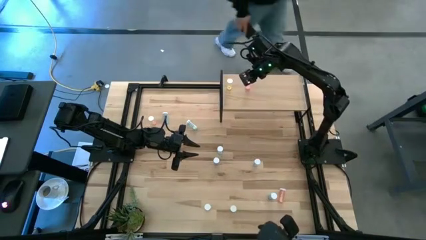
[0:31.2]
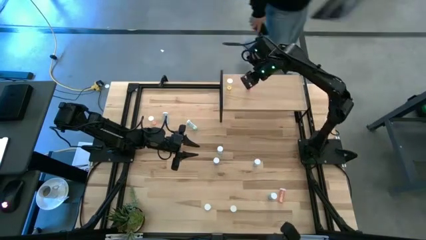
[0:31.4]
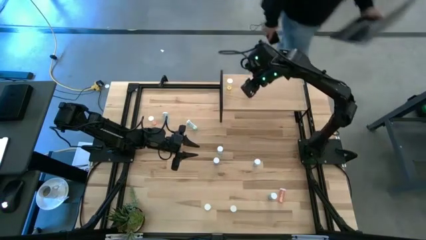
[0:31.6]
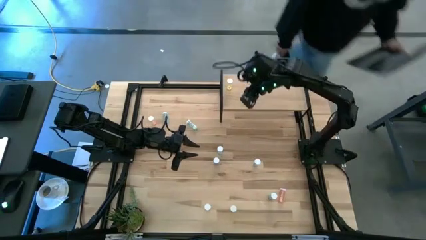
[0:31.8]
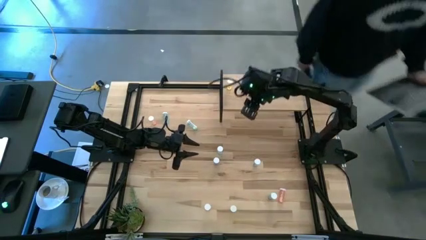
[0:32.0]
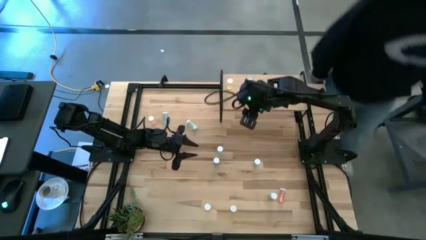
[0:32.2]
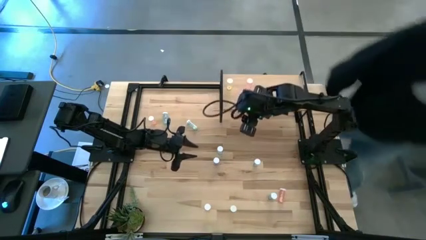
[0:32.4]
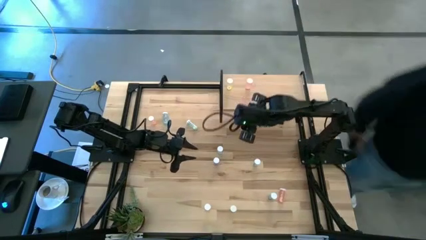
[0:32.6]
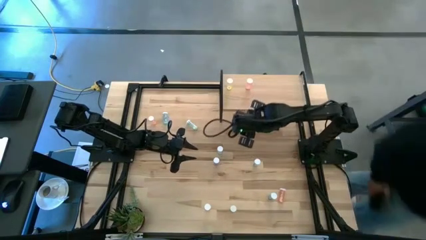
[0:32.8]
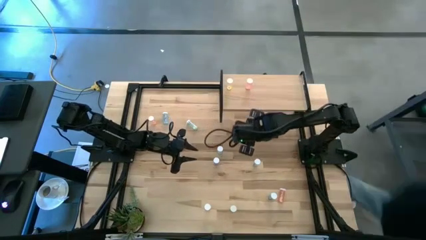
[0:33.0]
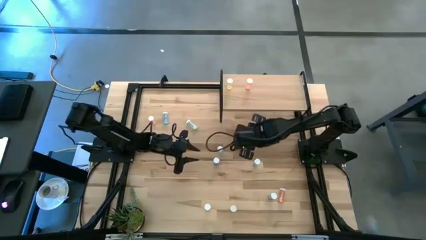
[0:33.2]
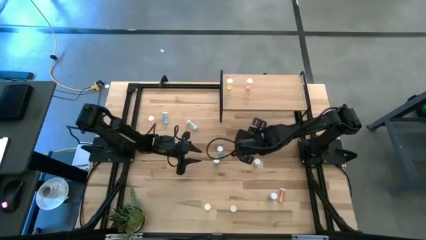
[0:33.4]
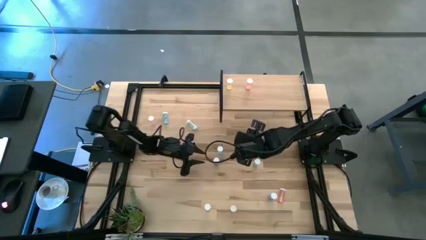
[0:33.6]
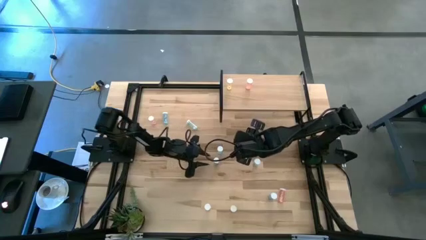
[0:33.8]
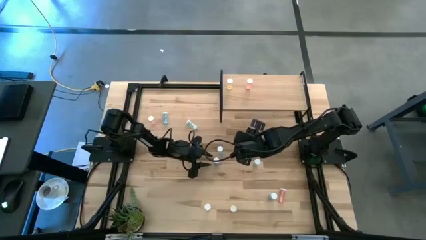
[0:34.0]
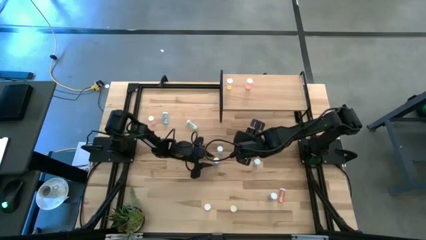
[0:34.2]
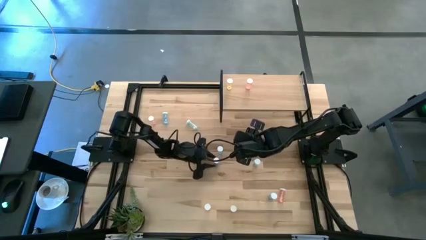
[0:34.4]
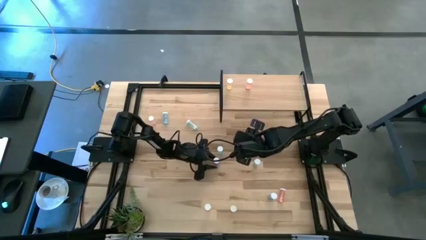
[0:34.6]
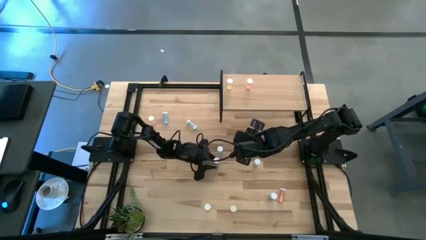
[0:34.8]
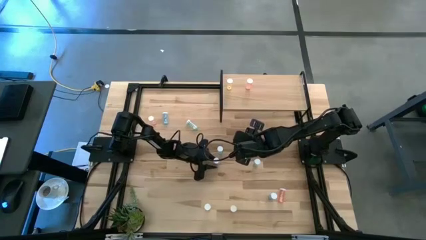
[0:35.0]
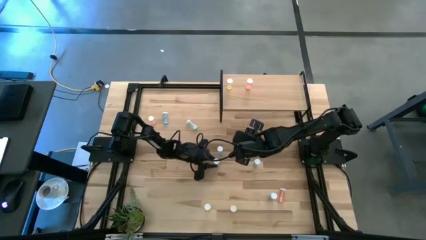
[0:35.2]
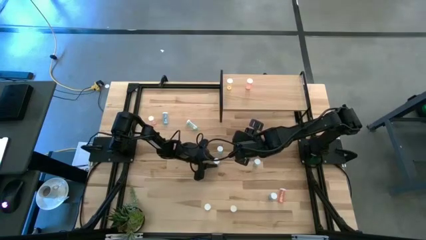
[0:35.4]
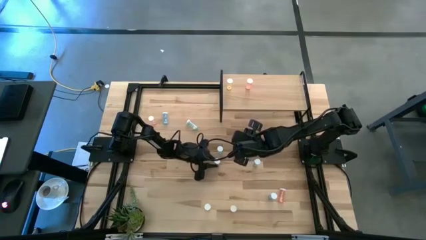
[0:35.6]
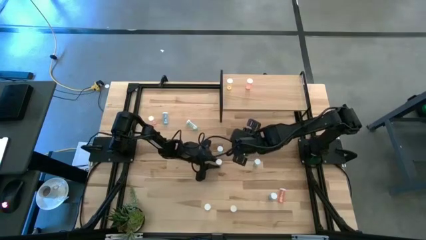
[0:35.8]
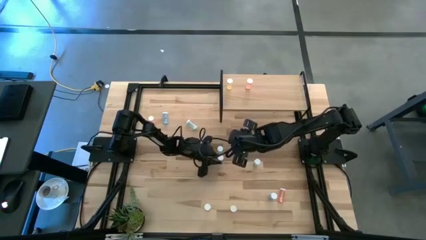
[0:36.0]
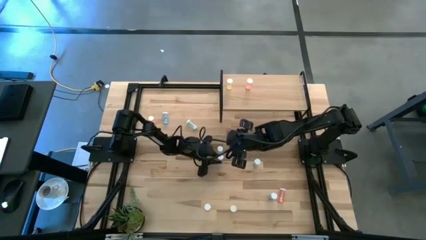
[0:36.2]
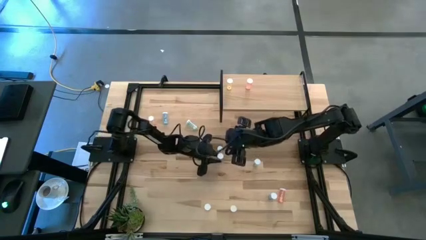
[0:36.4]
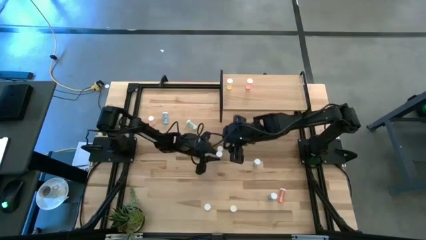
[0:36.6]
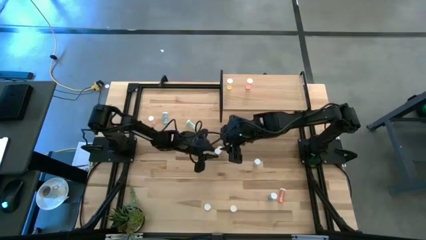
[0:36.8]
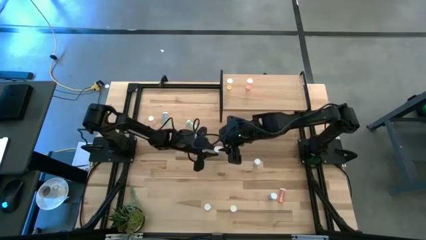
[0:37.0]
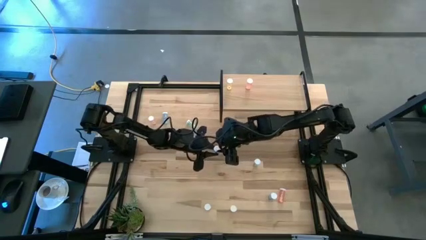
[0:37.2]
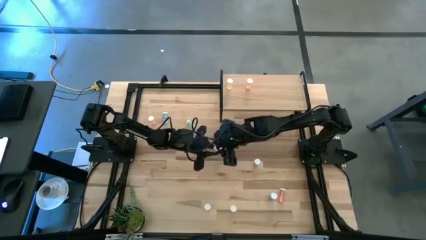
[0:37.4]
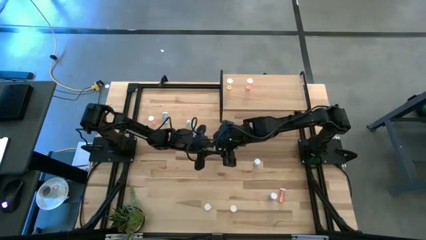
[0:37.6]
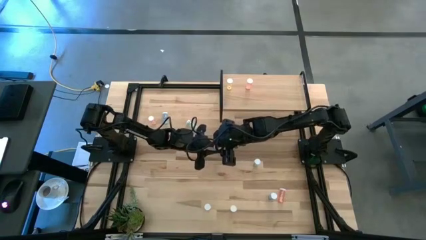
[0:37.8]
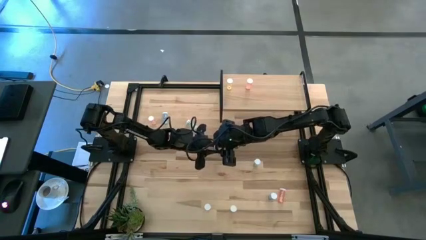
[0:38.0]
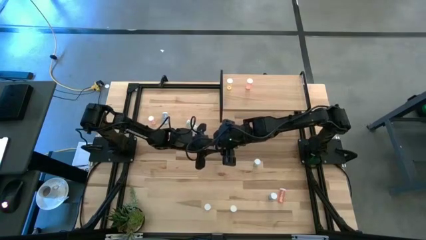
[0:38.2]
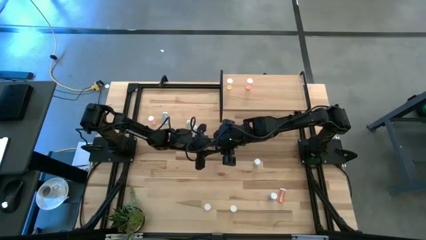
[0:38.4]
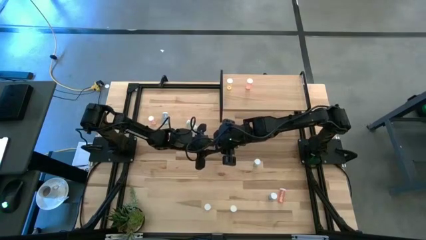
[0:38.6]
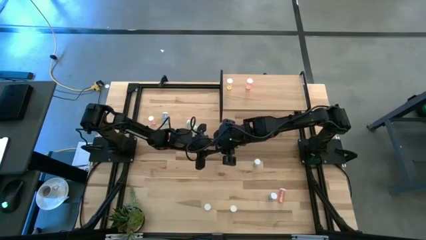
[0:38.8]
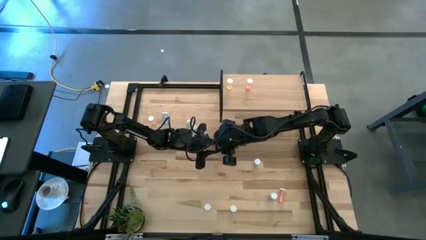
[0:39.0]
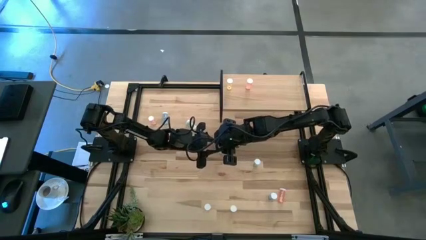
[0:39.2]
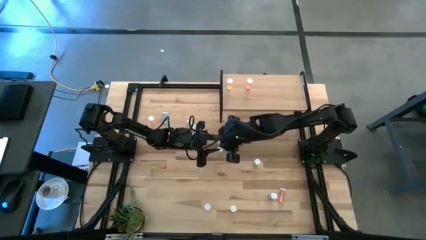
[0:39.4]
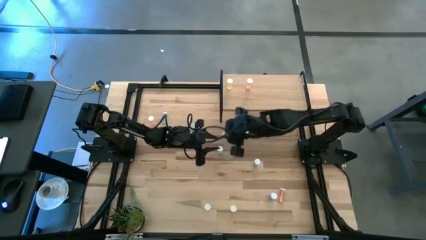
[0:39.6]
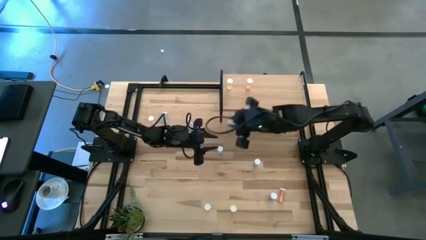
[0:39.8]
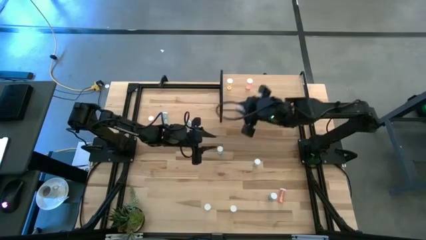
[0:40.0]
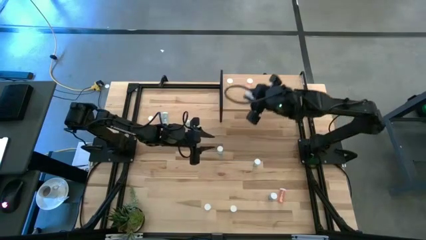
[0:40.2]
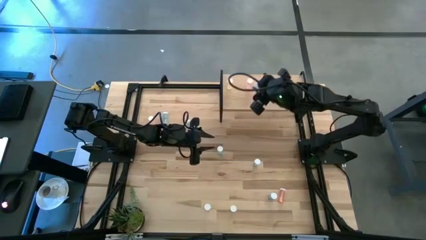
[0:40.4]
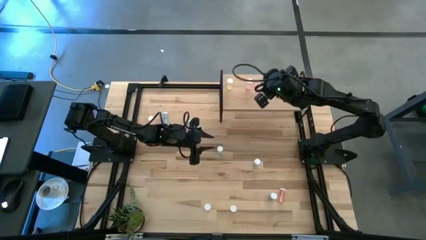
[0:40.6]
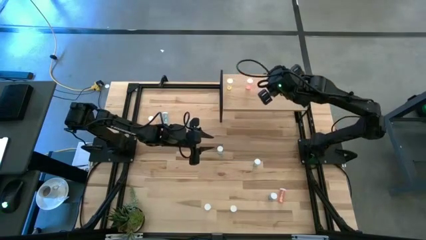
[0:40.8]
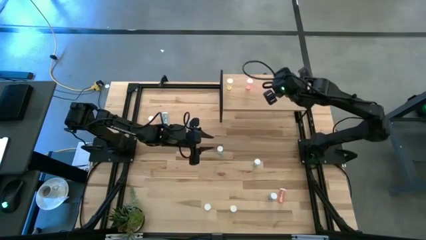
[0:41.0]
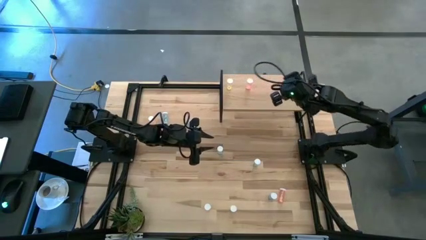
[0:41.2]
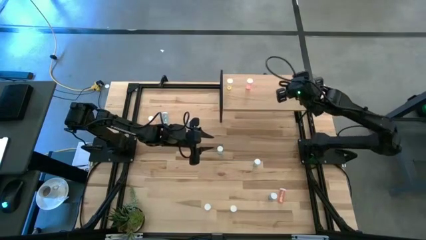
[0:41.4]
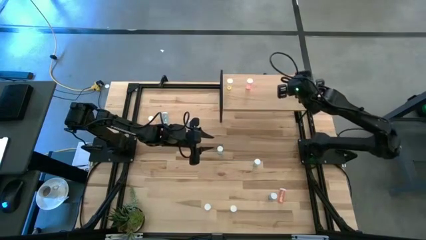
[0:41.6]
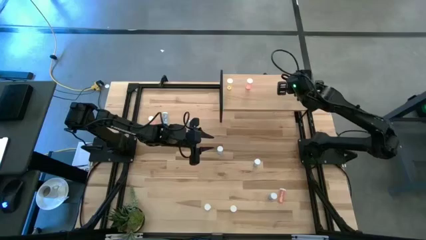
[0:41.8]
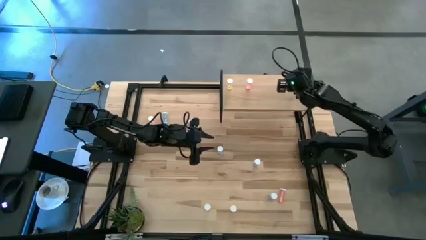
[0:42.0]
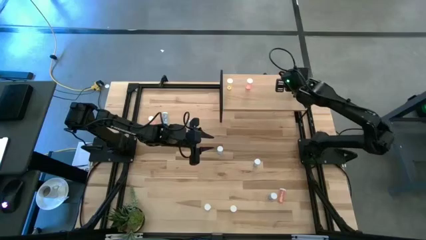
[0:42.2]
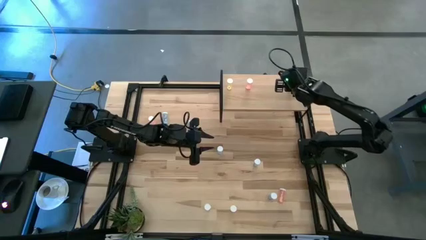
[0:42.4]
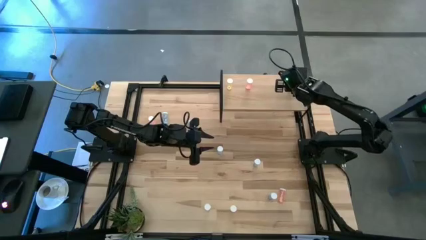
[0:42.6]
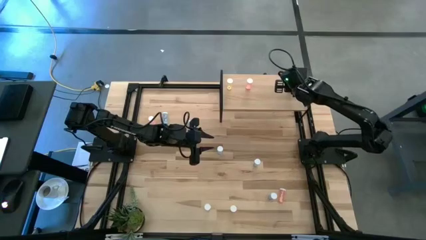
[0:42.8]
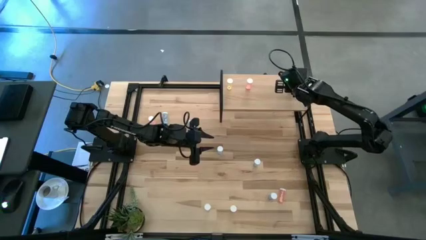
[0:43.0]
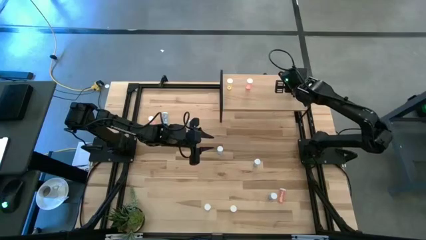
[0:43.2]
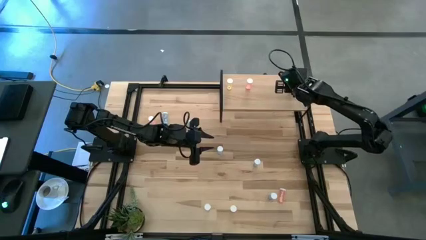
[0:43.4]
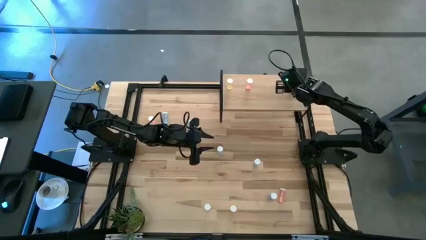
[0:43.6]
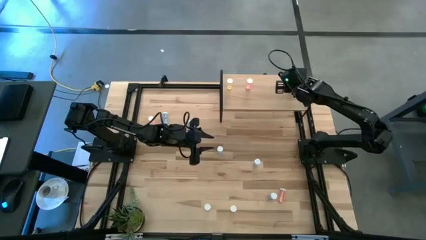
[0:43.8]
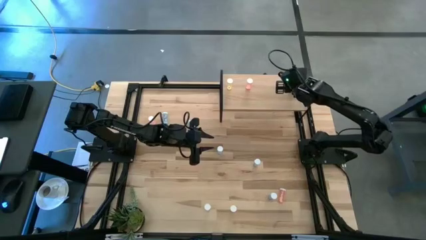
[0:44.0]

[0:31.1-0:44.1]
Task: Pick and place medicine bottles onto shelf by color
Put the center blue pill bottle on the shelf

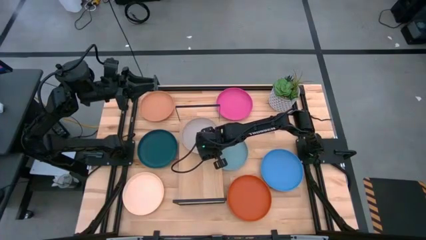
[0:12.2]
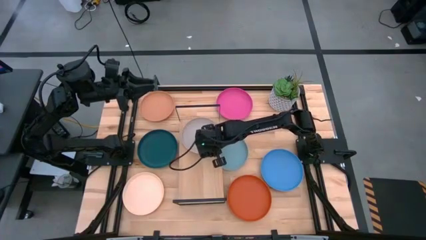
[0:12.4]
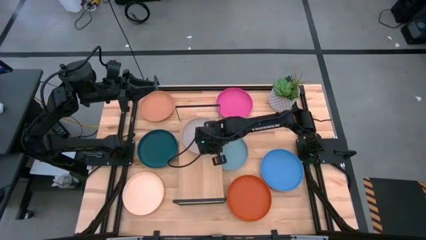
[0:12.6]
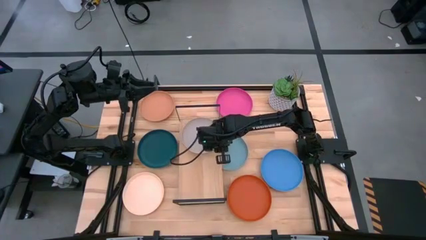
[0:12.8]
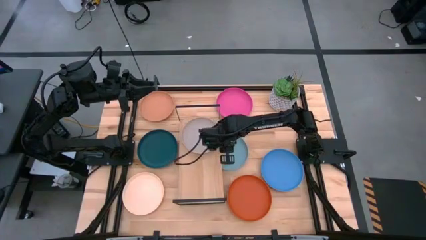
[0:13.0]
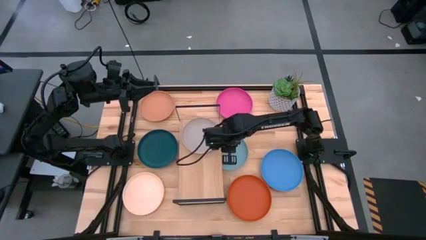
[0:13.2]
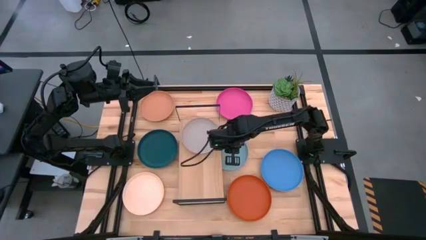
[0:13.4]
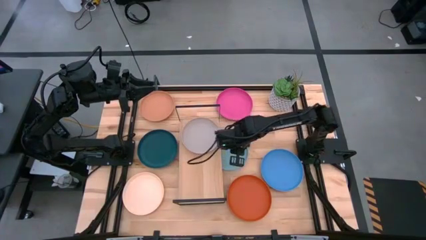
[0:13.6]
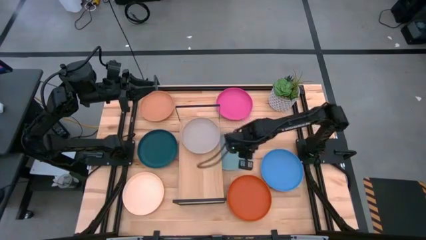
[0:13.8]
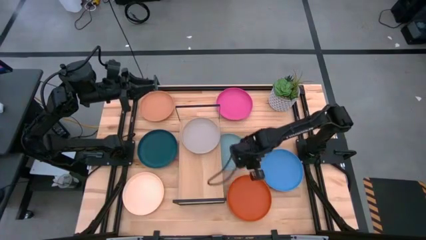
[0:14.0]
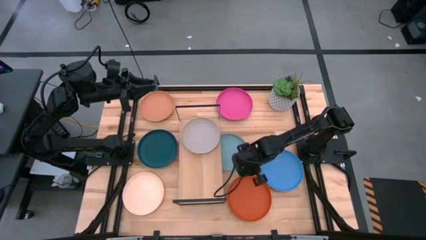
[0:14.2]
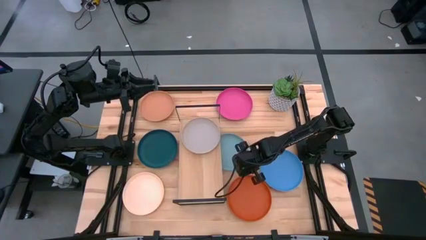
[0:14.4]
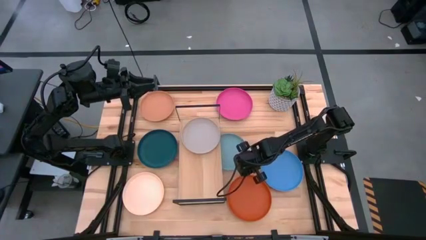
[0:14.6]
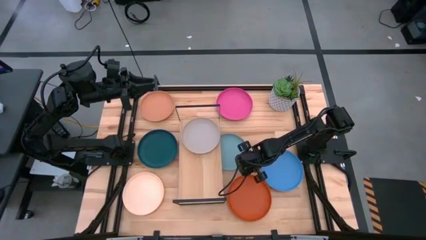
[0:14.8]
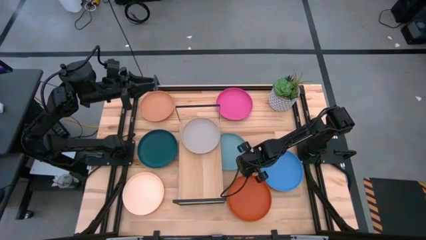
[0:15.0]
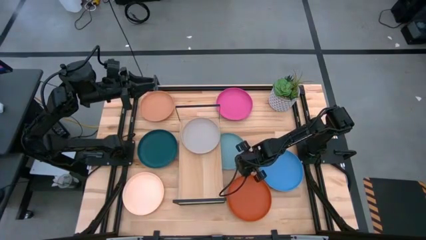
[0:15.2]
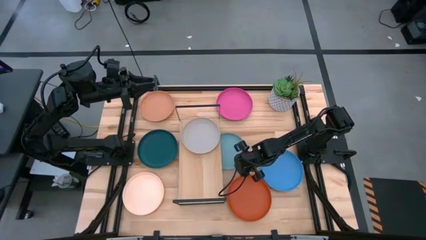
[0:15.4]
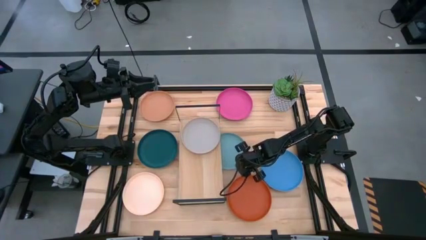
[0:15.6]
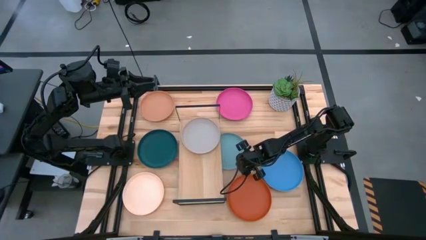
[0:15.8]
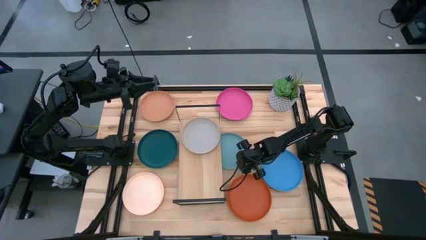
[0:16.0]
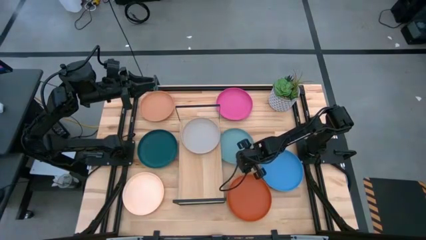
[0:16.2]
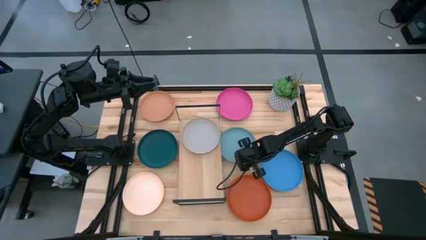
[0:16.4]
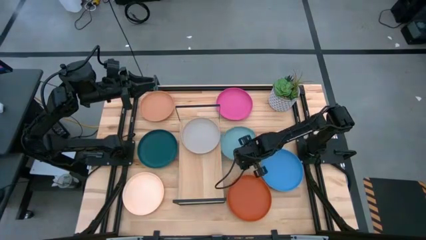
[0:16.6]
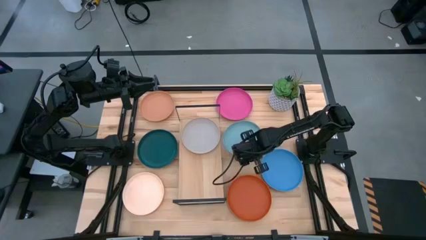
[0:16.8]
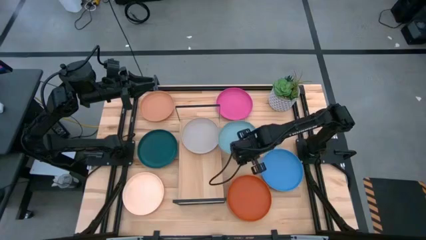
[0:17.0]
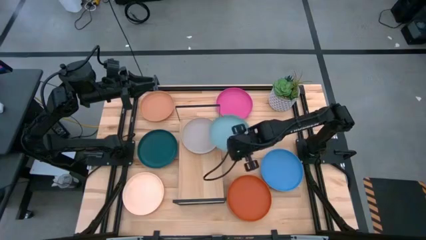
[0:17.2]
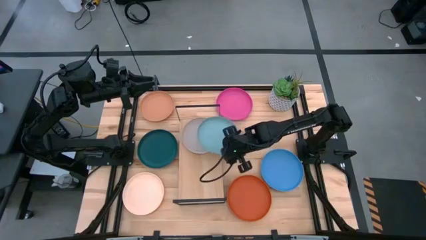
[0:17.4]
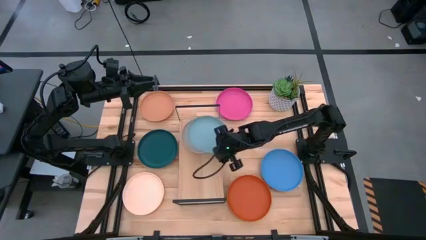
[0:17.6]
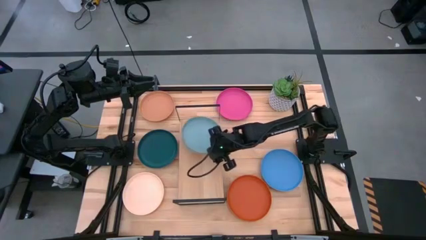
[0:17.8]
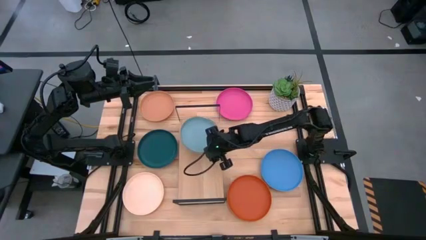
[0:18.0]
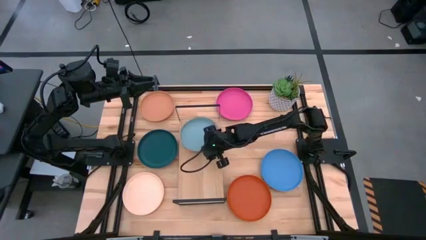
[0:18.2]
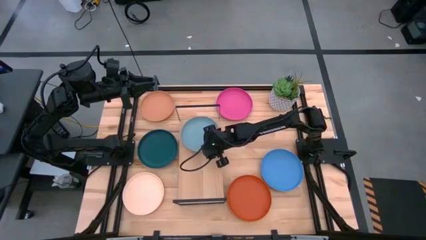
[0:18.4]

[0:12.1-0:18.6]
Task: Place and stack plates onto a shelf
Stack the light blue plate on top of the gray plate on the shelf
